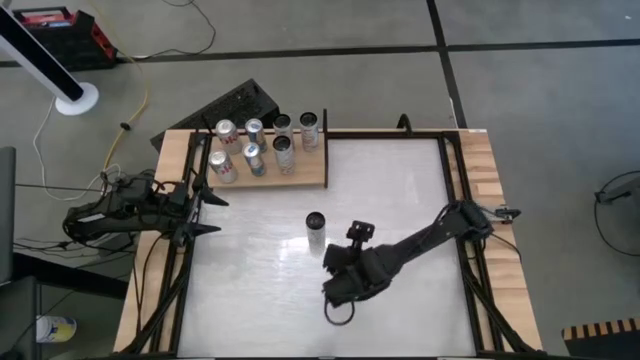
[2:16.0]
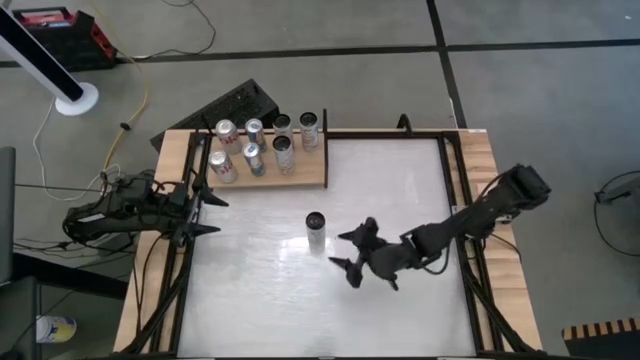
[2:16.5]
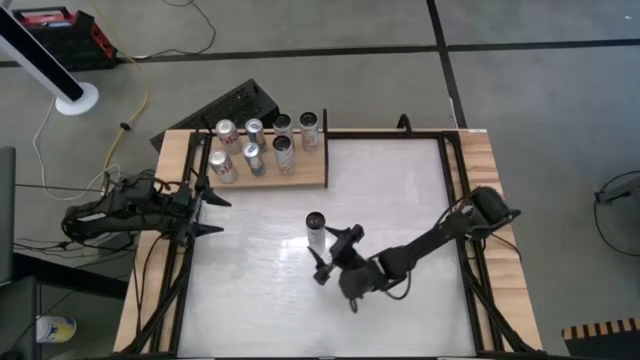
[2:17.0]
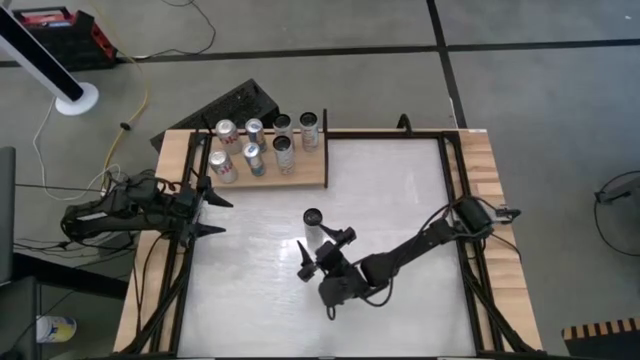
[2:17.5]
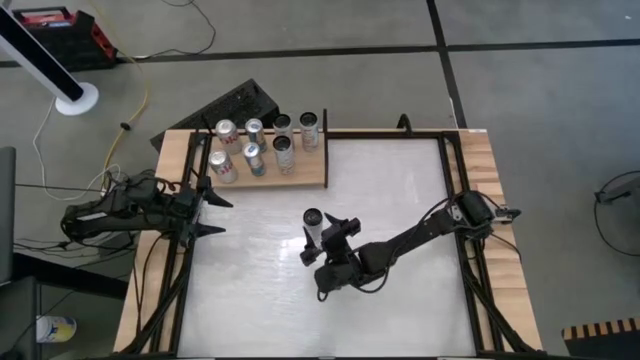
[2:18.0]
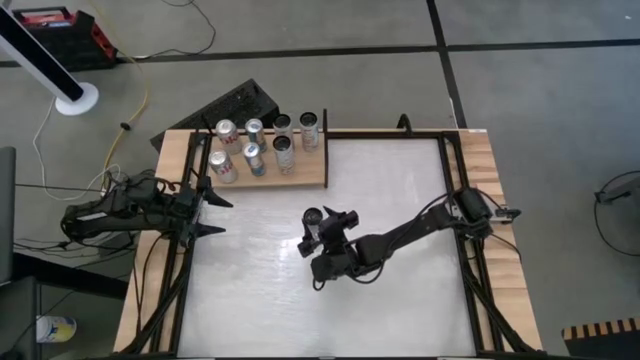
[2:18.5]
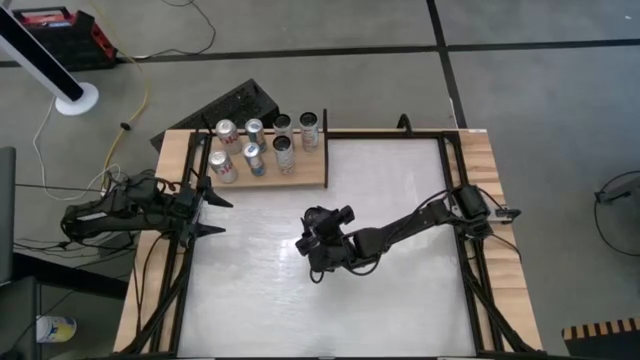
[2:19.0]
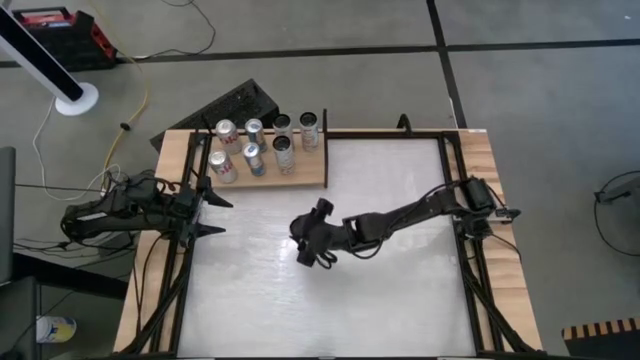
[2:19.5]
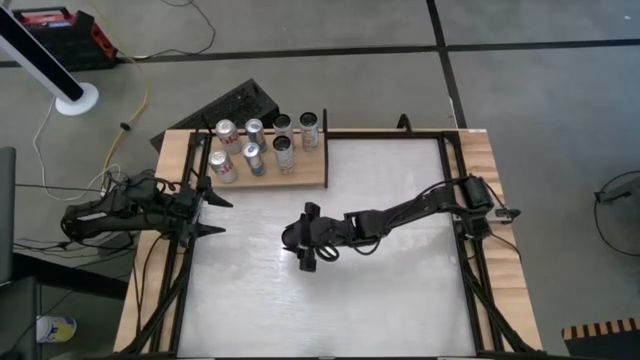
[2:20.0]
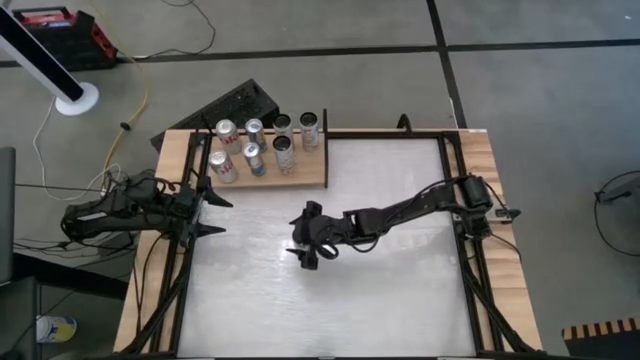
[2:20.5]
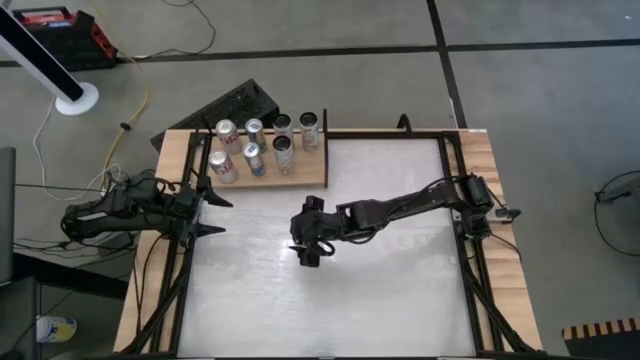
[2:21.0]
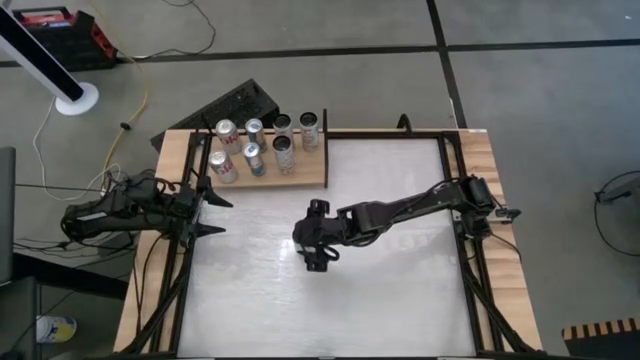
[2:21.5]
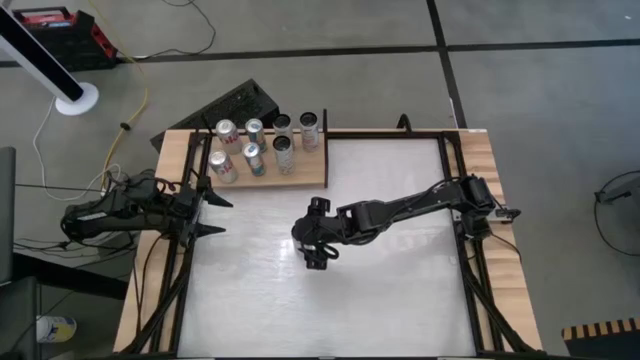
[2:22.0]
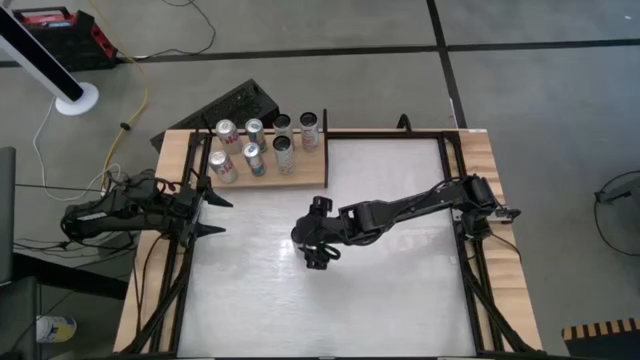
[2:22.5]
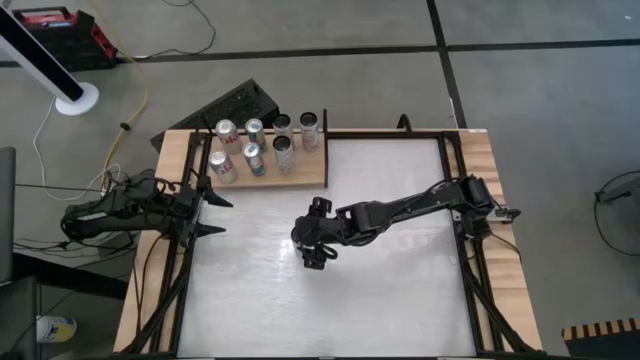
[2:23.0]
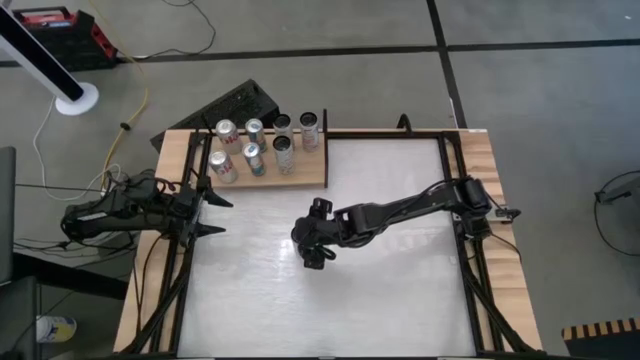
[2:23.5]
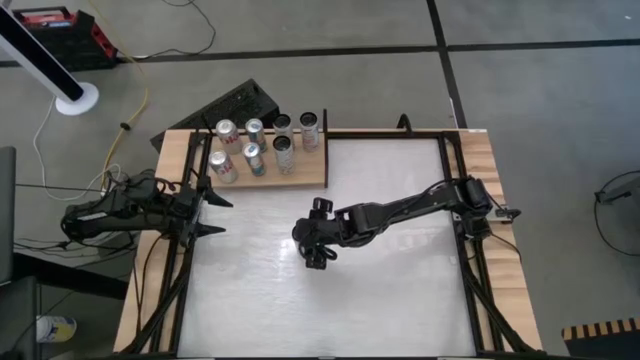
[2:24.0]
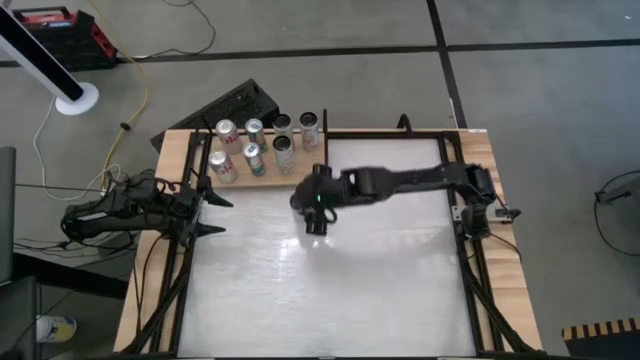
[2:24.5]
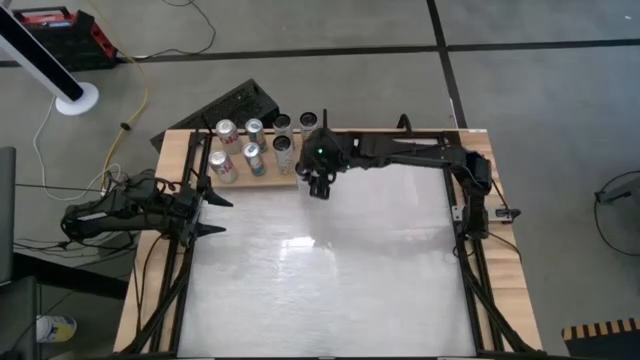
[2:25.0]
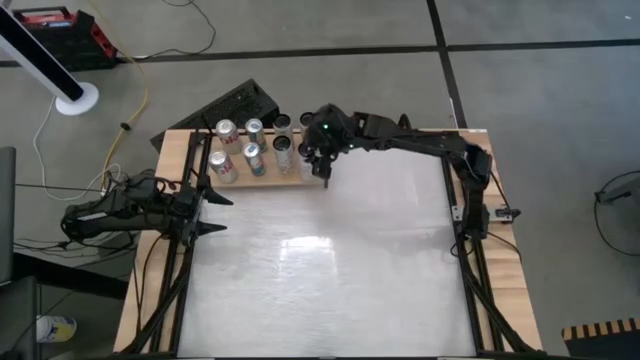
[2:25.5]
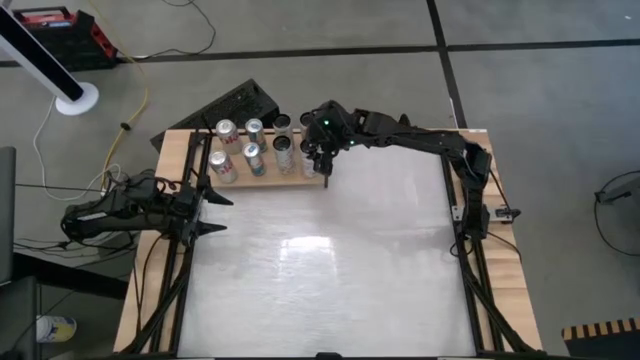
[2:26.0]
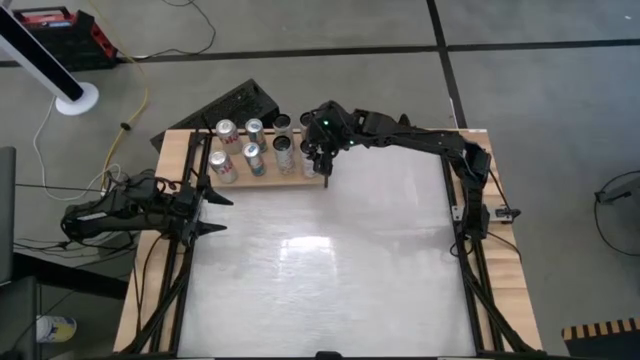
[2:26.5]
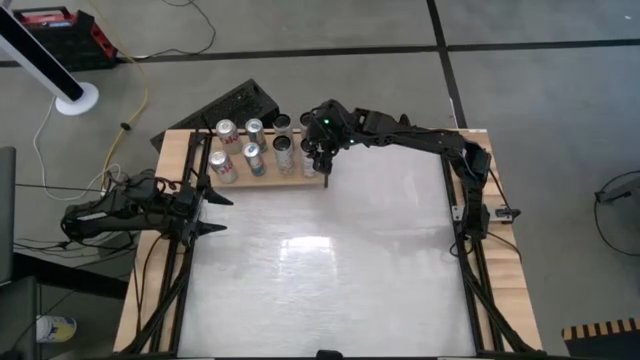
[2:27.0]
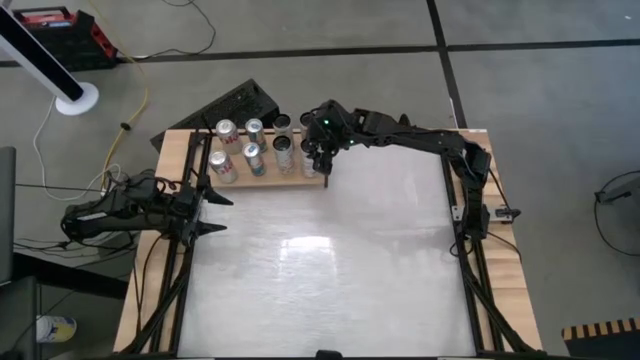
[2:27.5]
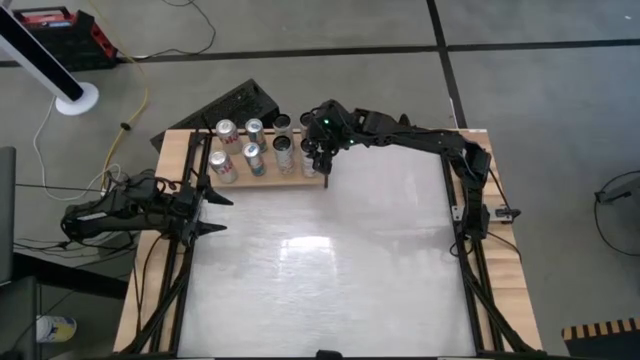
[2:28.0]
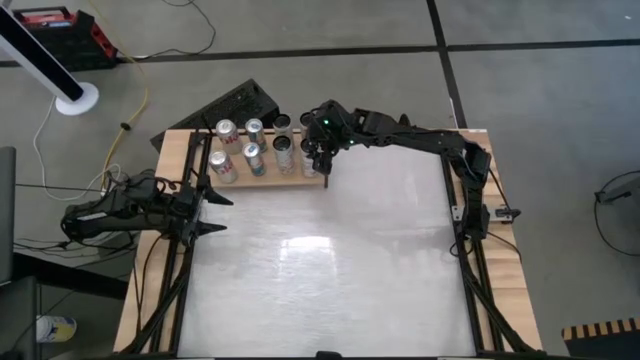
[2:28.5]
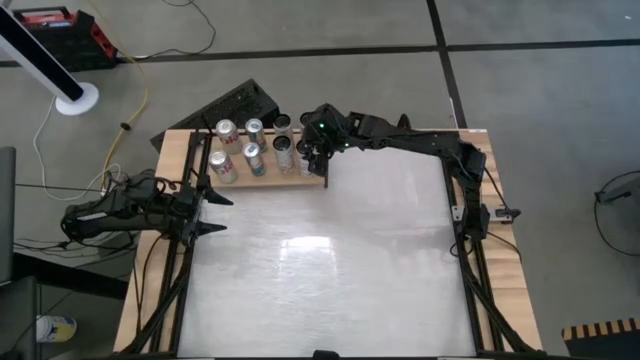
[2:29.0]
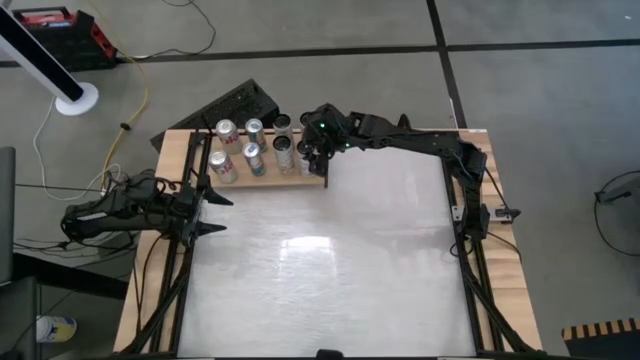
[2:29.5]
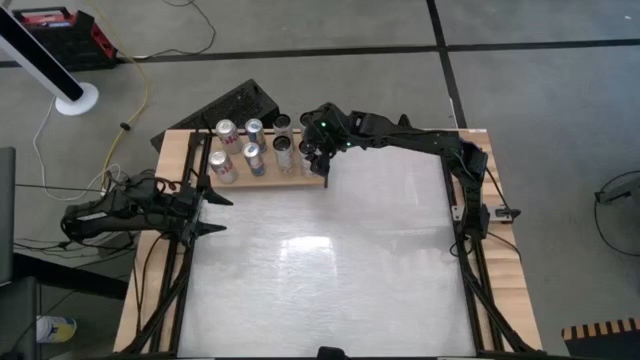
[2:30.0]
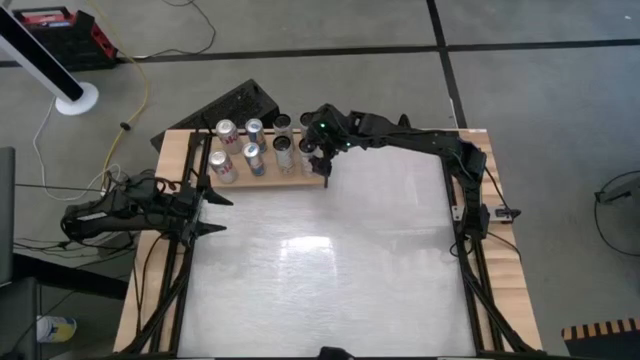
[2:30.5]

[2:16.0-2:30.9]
Task: Place canned beverage on shelf
Put the white and pink soda can aligned with the other white and pink soda can on the shelf

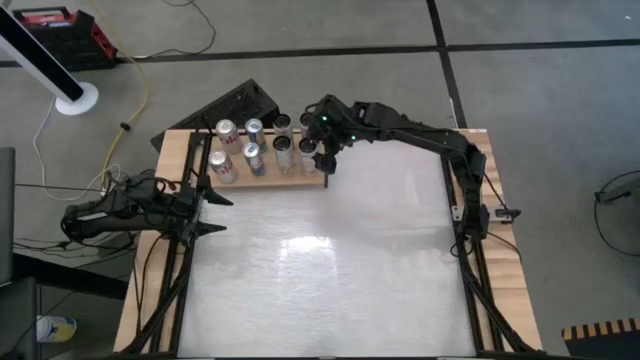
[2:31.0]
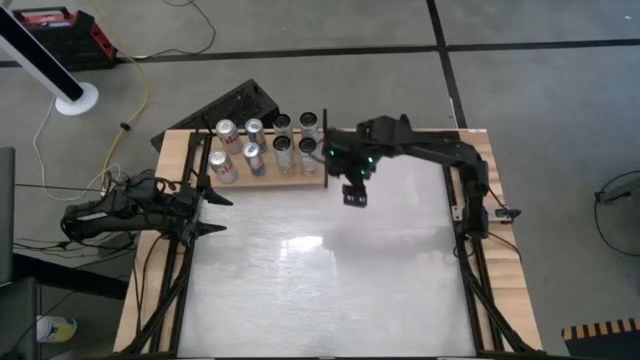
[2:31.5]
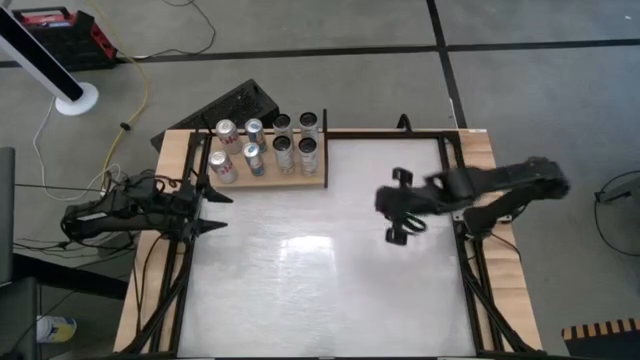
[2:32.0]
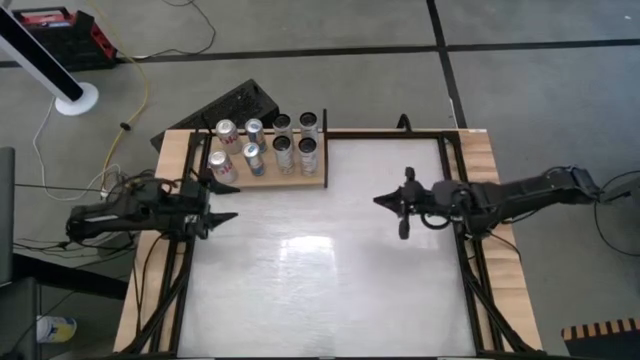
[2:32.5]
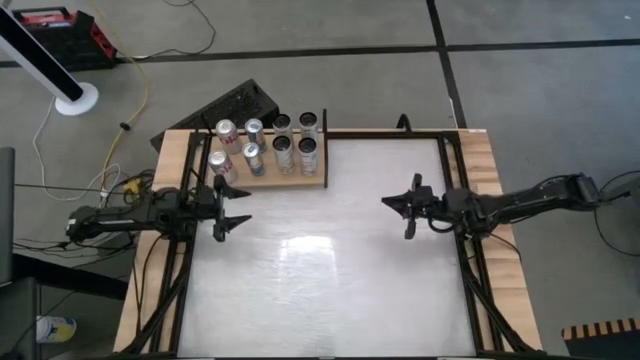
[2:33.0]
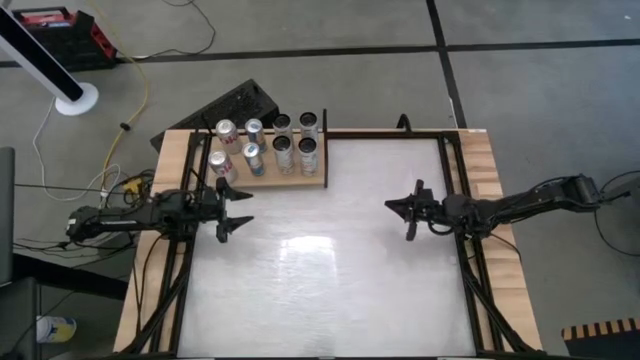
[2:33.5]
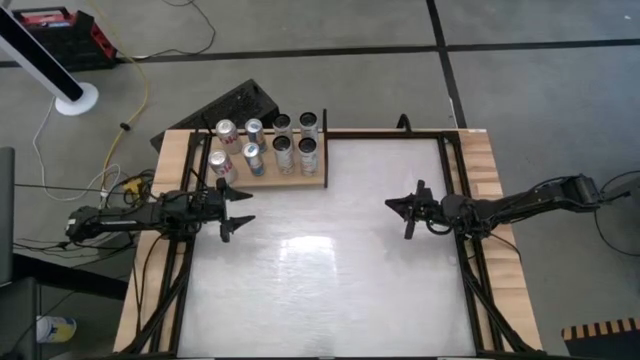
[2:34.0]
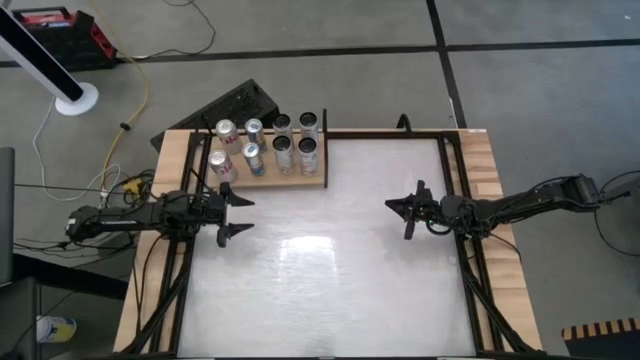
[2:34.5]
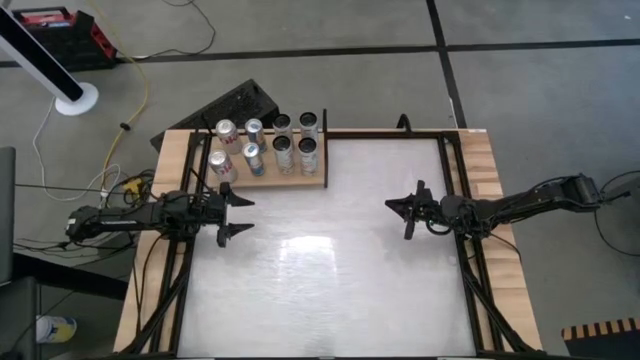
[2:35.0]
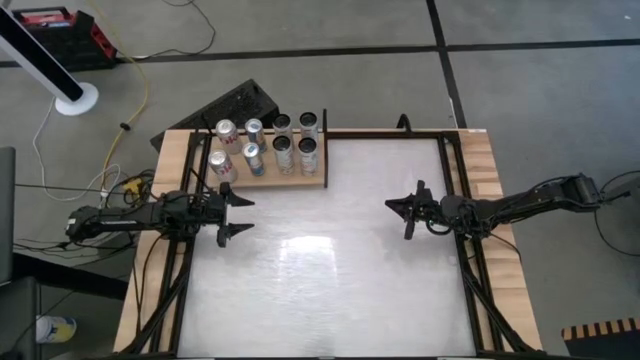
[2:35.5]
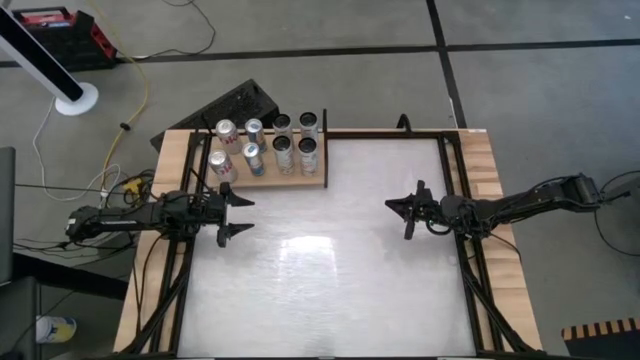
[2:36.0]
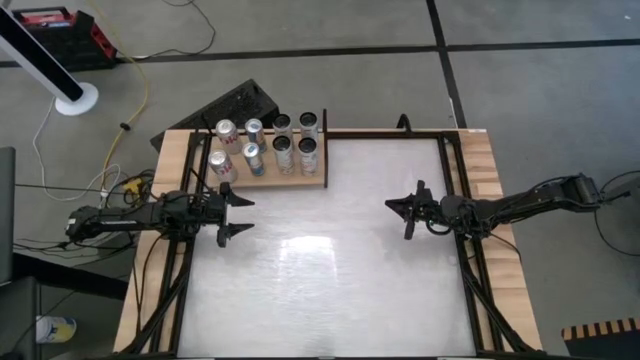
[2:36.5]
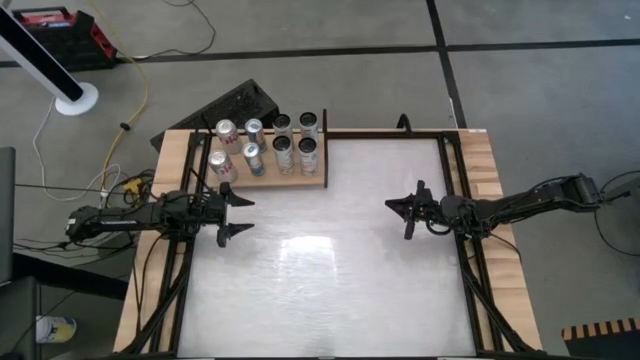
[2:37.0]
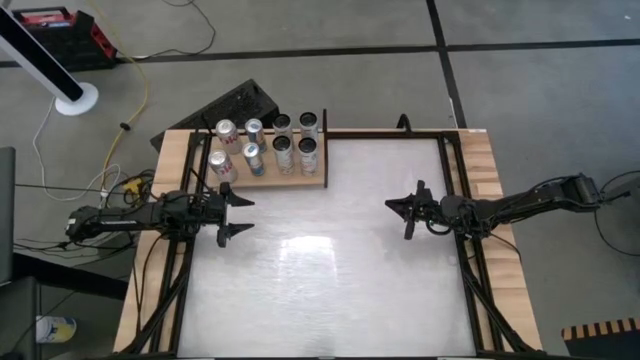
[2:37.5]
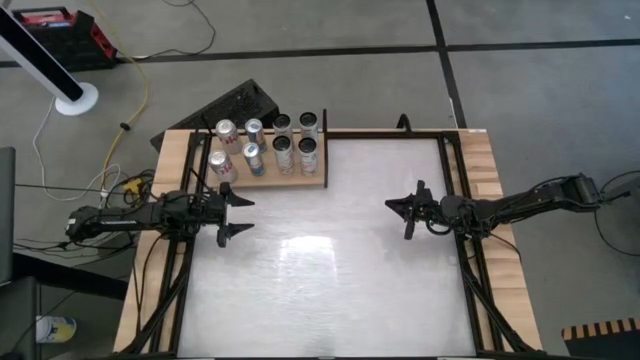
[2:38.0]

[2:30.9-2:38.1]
Return to Home Position
